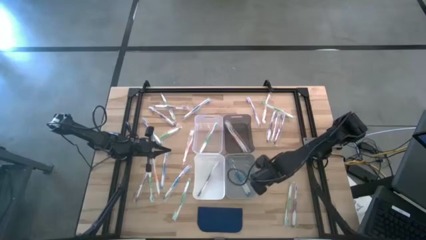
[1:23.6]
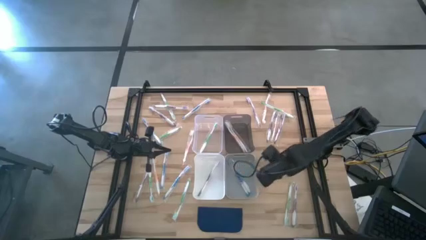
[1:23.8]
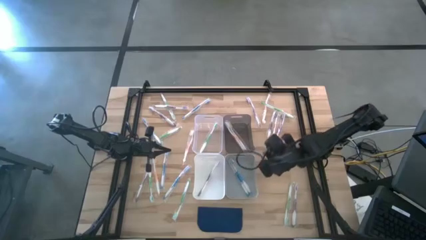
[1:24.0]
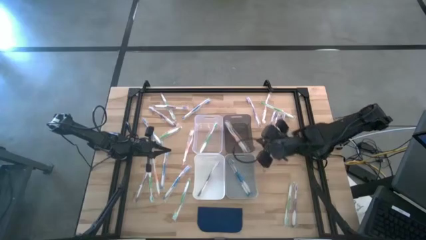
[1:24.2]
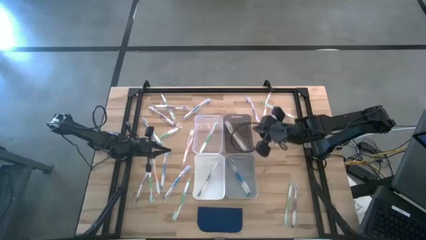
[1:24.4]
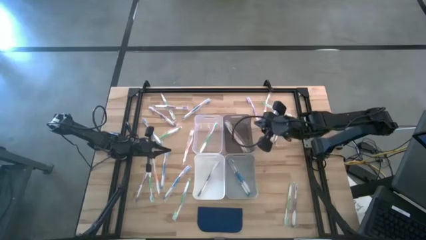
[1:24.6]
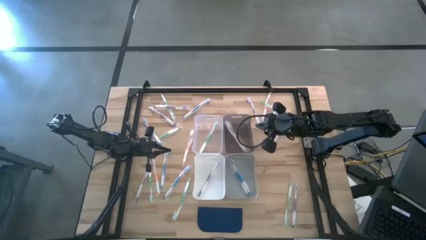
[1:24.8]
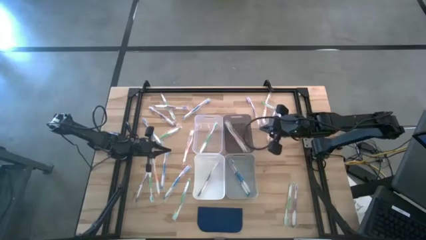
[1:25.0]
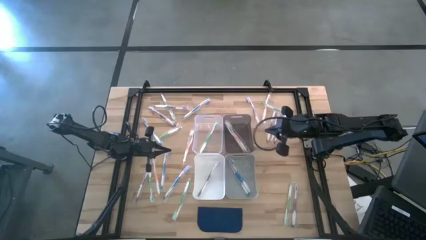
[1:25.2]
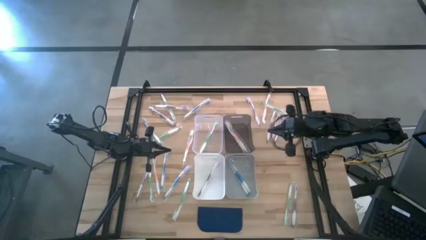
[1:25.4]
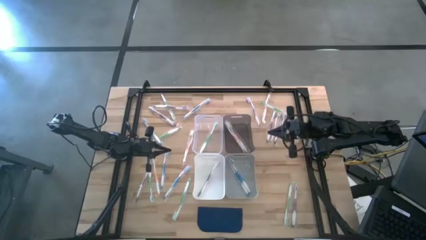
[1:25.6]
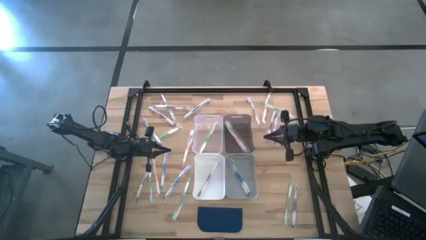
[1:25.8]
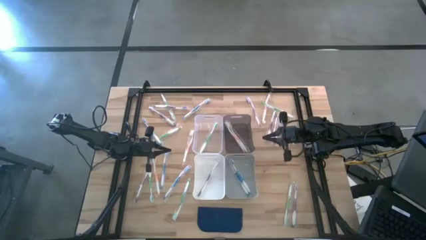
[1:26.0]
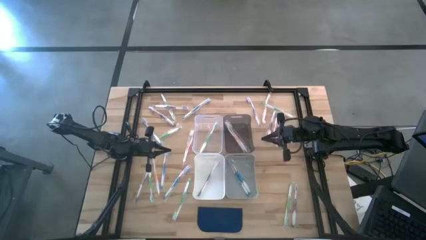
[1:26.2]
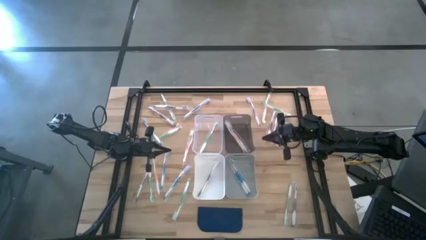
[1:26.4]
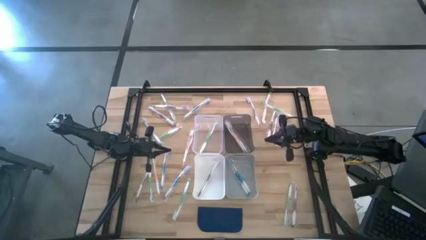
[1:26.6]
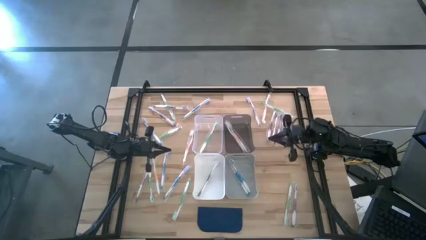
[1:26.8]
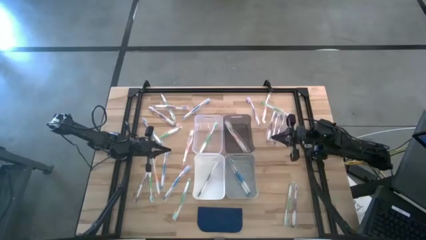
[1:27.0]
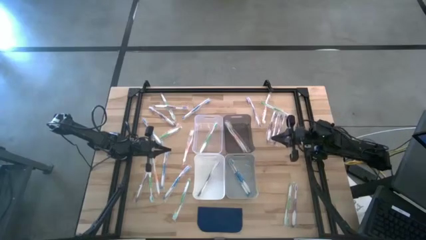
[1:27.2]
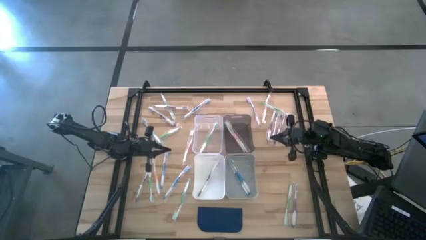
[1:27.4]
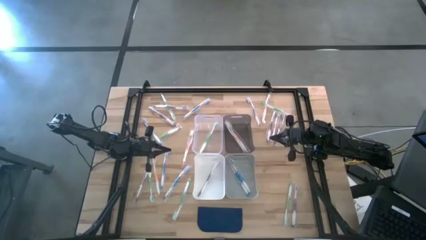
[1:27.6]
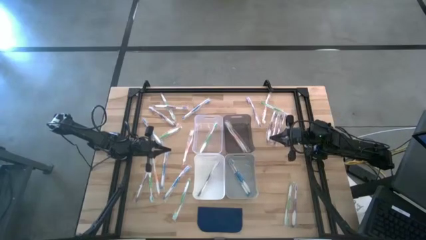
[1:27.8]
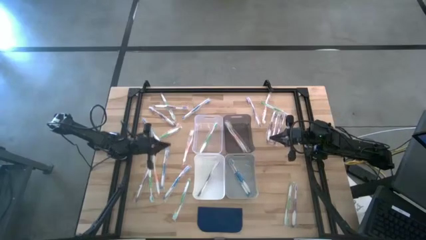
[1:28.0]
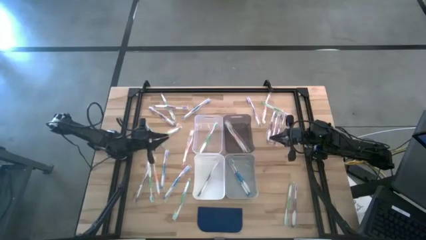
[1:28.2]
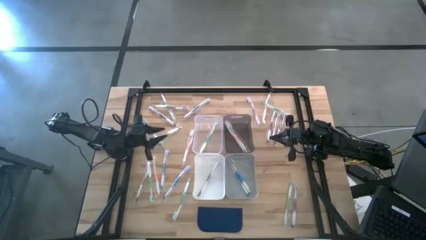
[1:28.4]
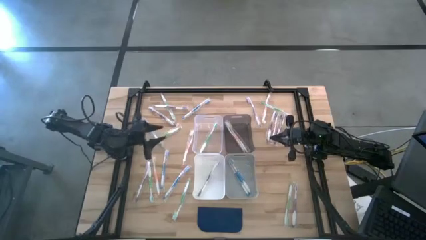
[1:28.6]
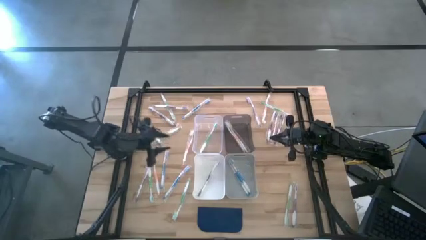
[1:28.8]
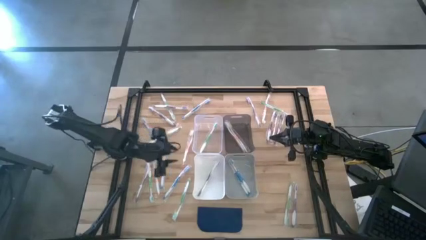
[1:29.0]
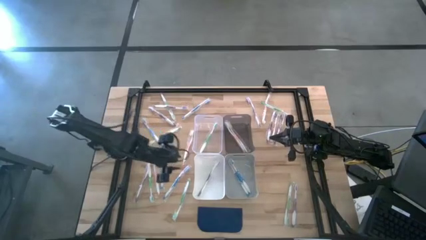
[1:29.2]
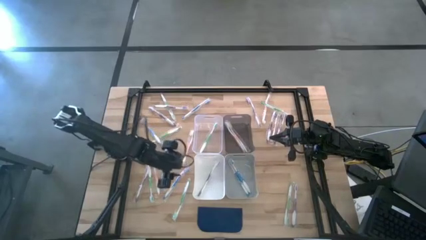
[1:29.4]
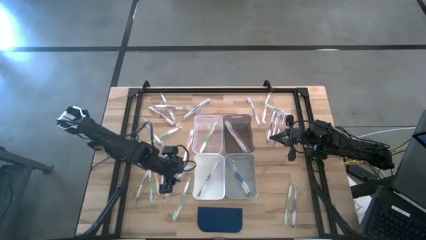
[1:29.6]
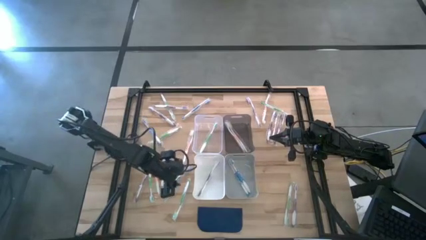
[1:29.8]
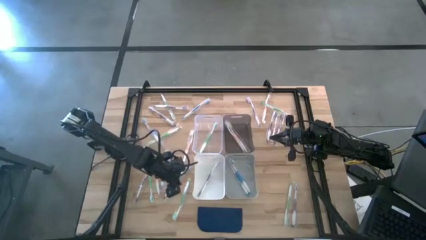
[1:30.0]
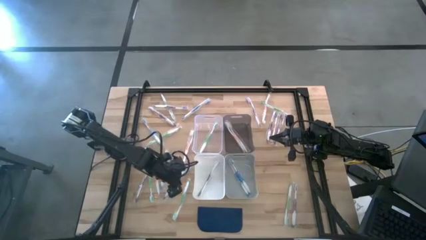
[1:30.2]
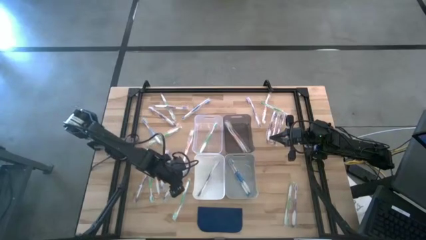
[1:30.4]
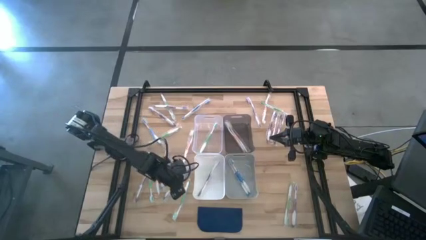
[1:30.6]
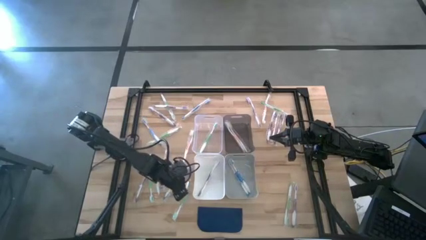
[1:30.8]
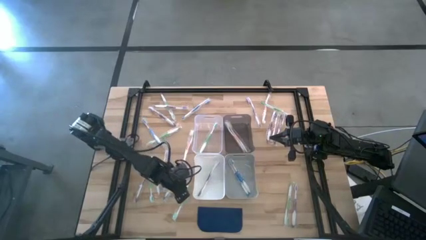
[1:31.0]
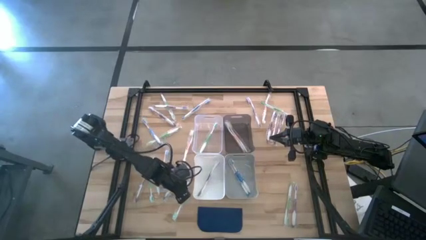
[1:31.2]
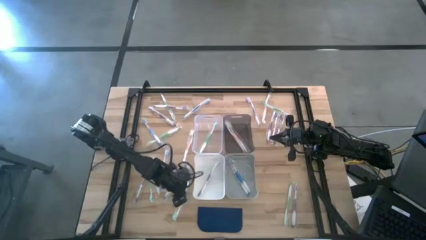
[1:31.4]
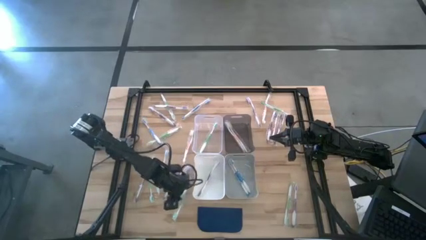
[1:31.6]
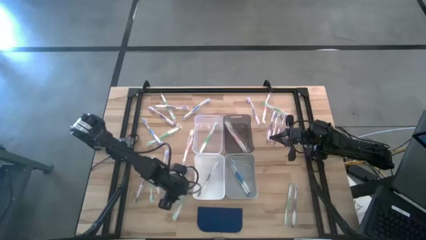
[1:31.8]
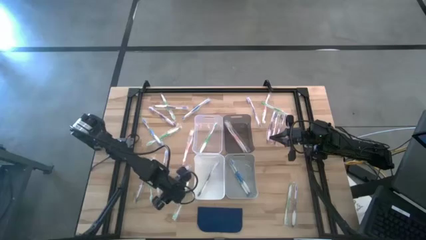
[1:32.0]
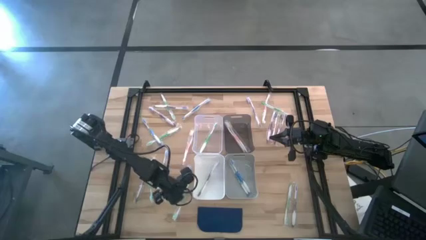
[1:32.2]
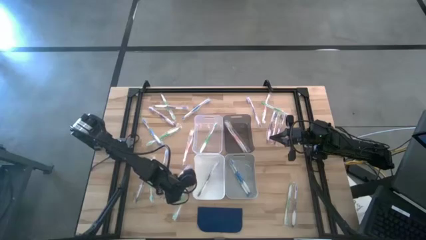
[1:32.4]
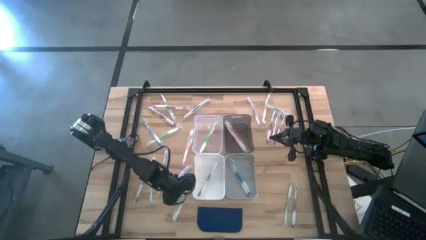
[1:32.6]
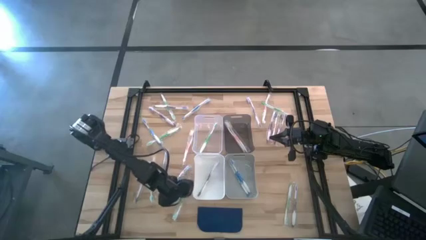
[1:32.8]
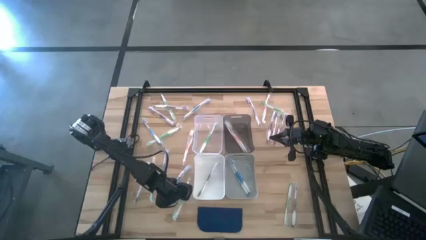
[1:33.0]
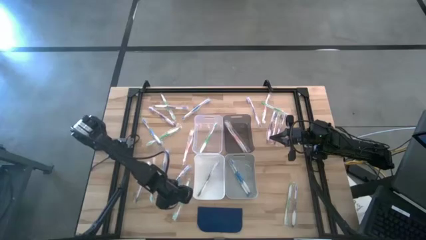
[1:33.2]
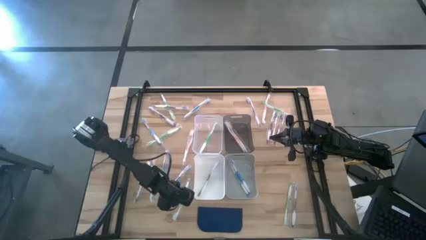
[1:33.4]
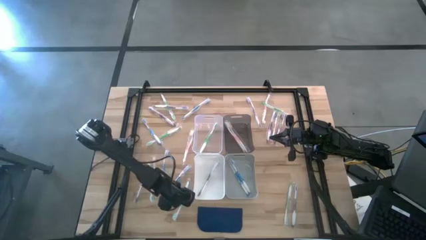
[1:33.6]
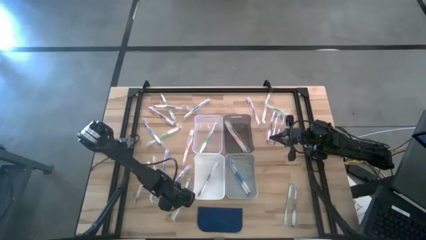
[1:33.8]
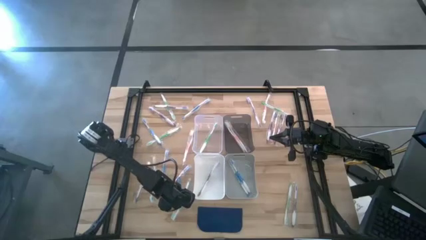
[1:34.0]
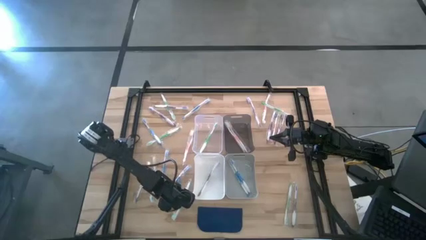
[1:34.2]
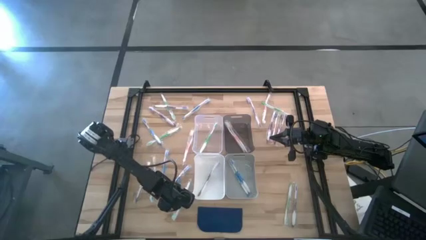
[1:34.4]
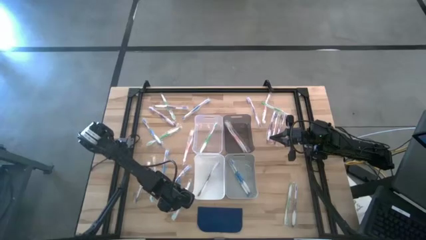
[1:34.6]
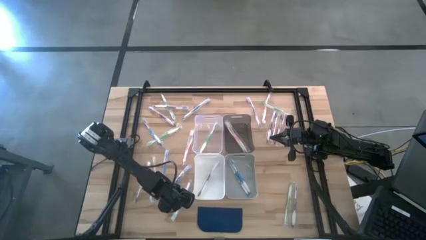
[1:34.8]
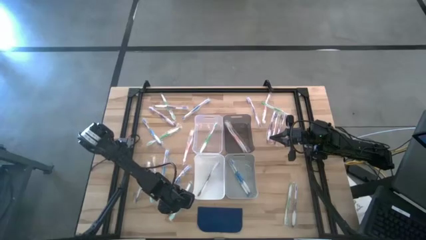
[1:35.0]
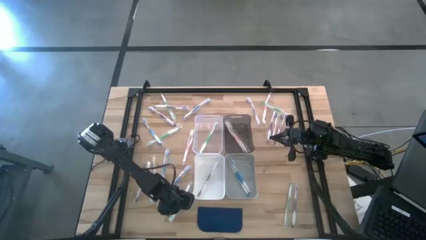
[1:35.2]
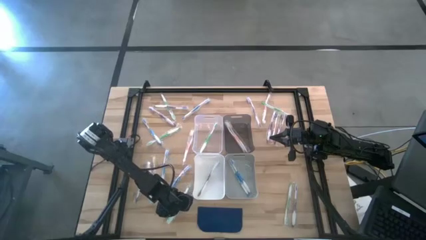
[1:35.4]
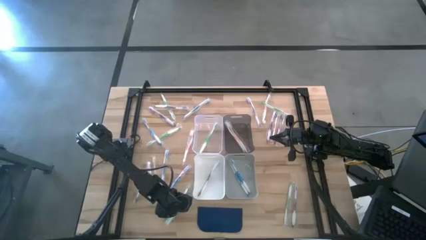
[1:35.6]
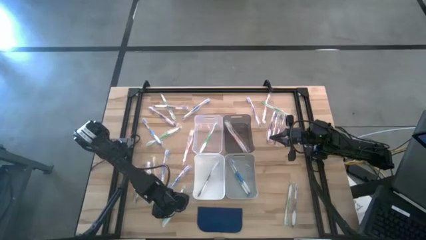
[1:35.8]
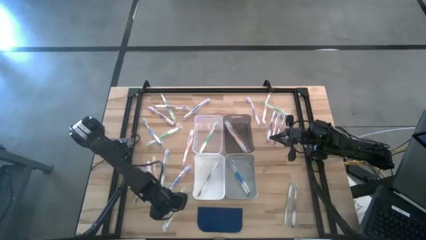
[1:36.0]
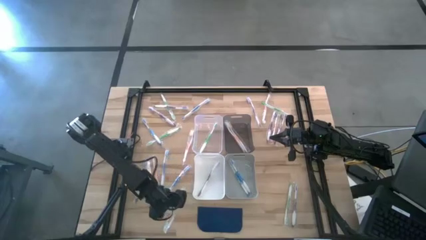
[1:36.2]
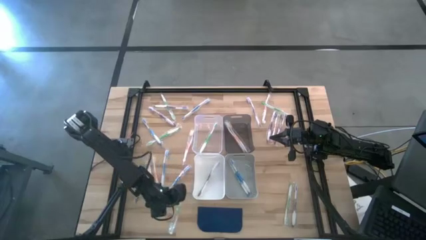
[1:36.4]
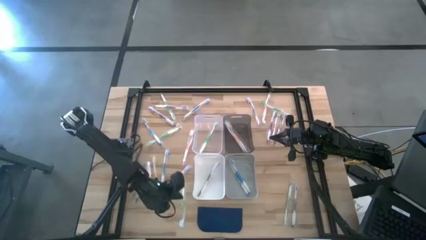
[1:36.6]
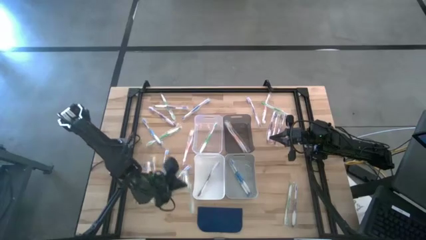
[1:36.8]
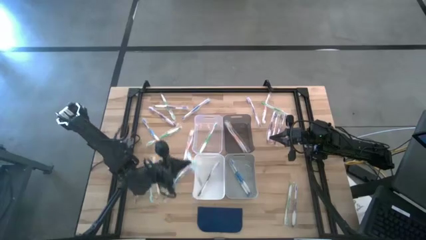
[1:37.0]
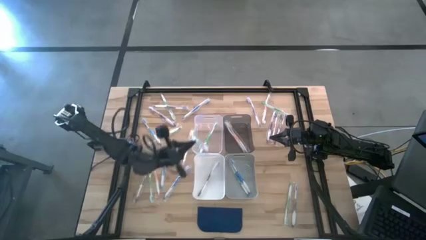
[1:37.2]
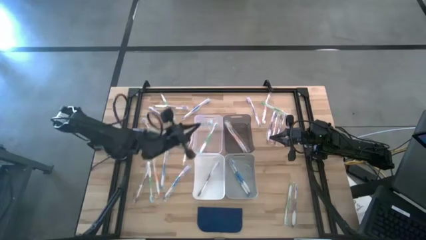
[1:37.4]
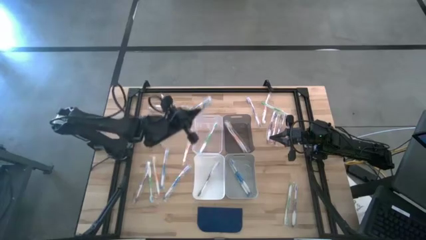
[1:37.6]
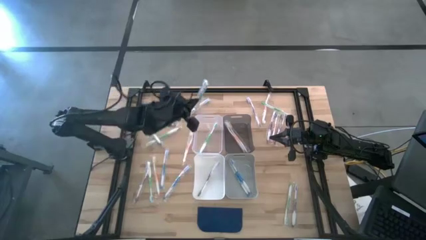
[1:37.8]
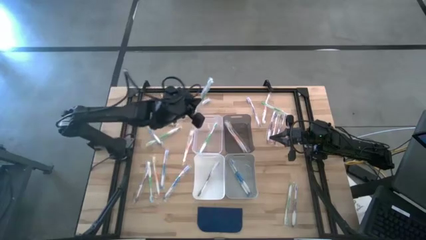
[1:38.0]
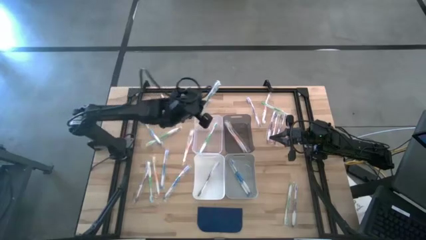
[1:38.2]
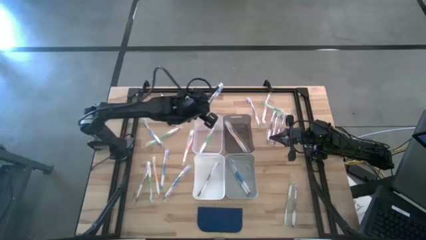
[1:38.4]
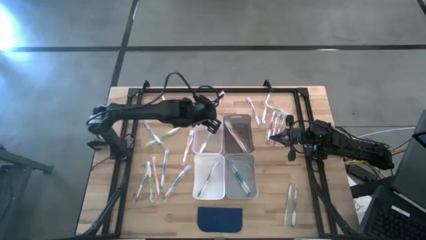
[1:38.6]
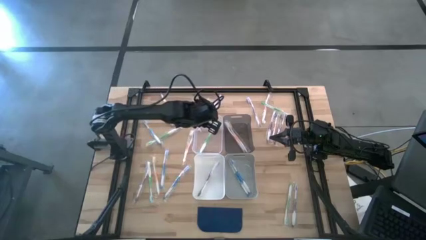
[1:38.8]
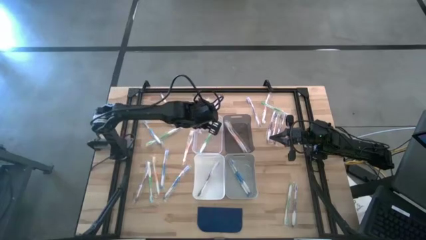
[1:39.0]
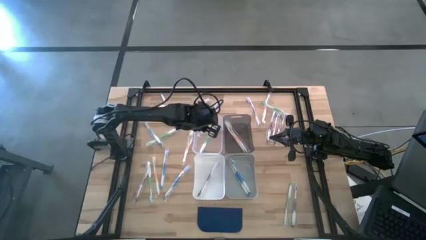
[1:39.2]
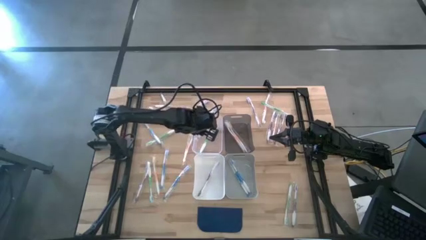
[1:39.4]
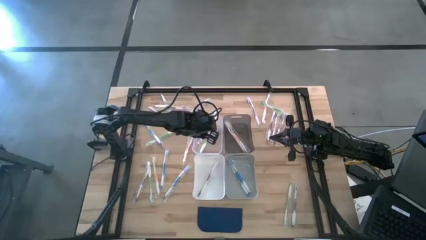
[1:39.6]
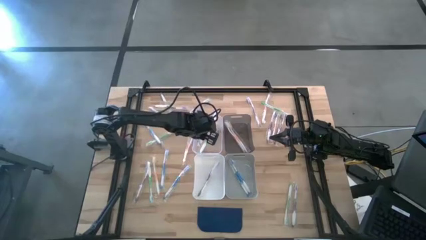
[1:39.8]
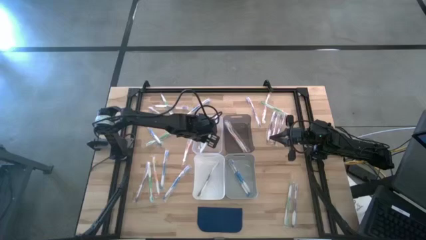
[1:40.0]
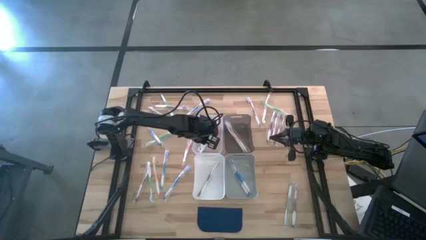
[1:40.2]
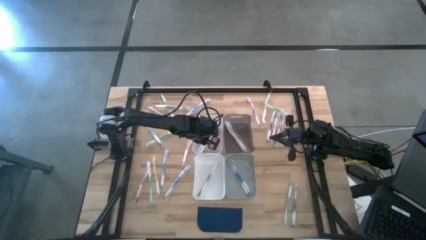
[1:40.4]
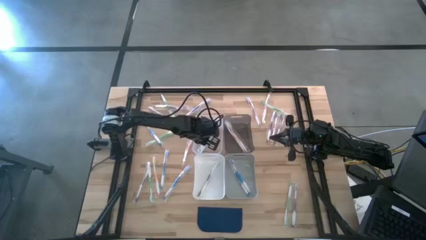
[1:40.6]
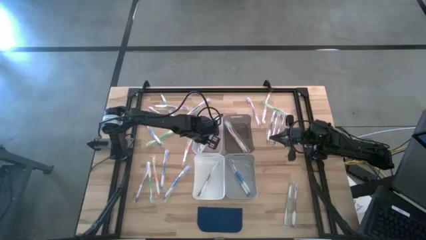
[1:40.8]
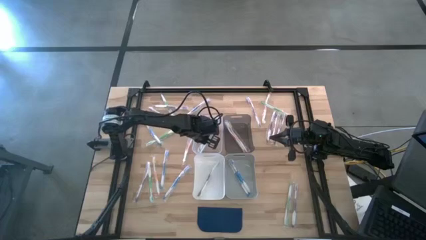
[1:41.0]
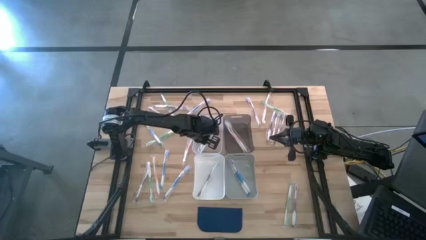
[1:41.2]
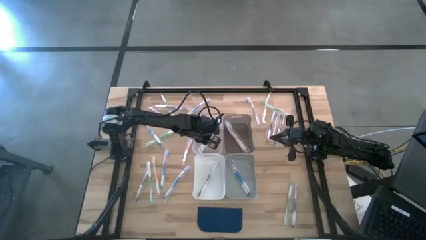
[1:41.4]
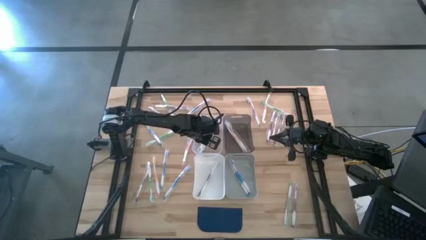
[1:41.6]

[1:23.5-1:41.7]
Task: Pick & Place Toothbrushes
Put the green toothbrush into the transparent bin
